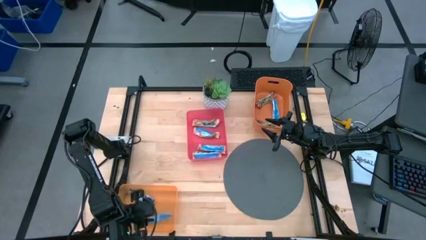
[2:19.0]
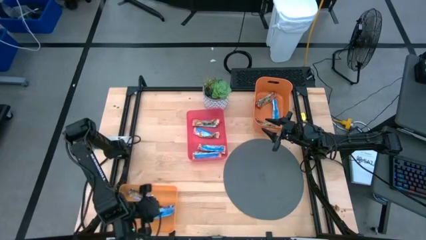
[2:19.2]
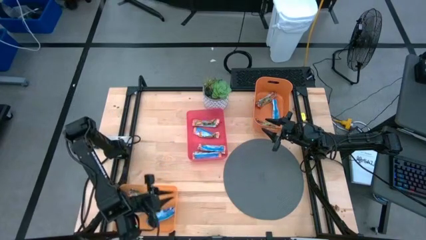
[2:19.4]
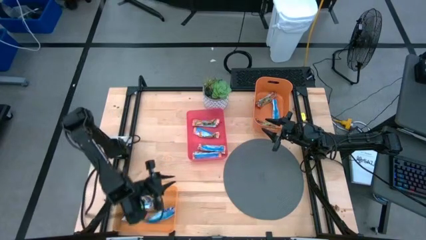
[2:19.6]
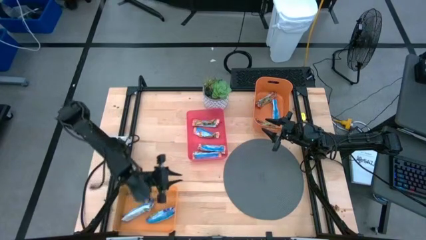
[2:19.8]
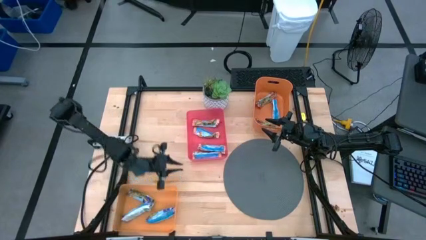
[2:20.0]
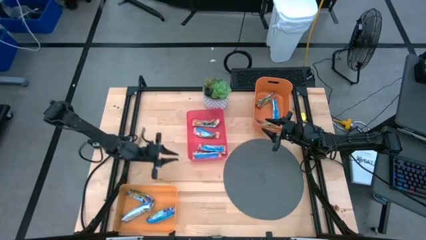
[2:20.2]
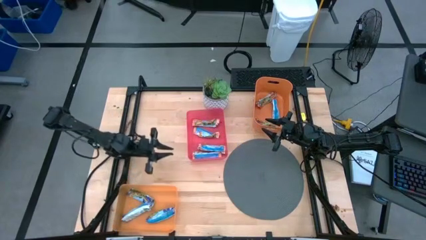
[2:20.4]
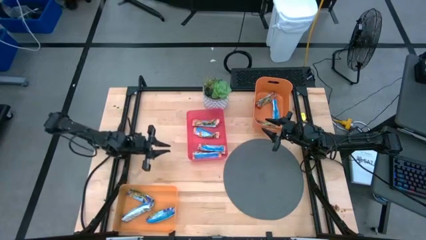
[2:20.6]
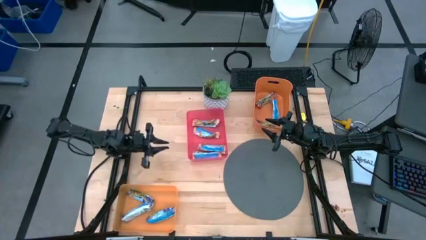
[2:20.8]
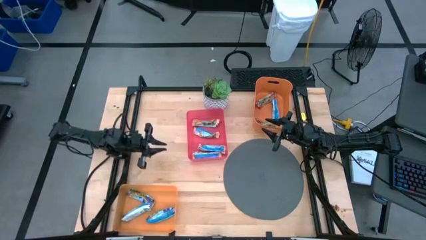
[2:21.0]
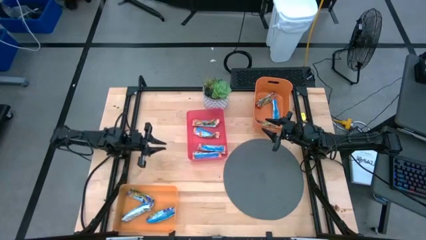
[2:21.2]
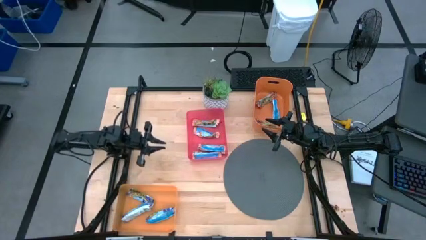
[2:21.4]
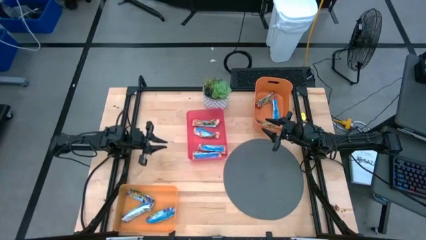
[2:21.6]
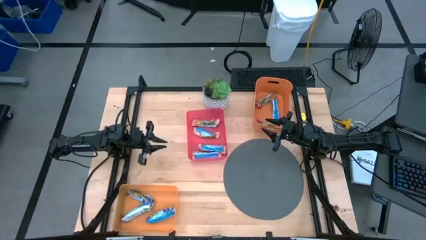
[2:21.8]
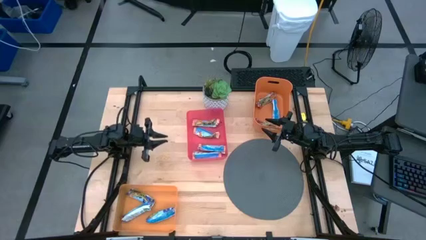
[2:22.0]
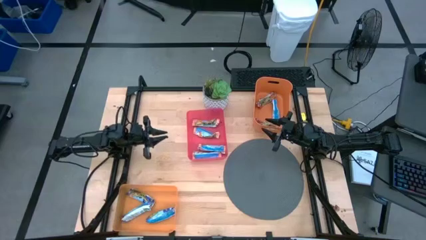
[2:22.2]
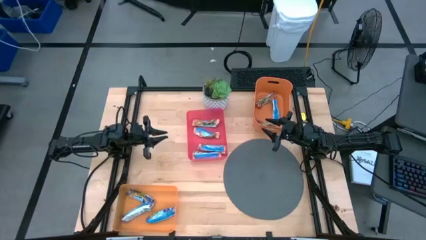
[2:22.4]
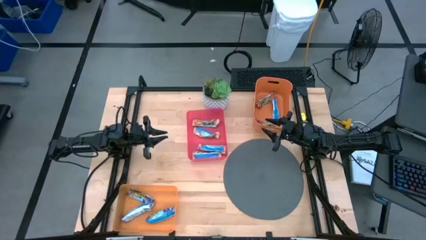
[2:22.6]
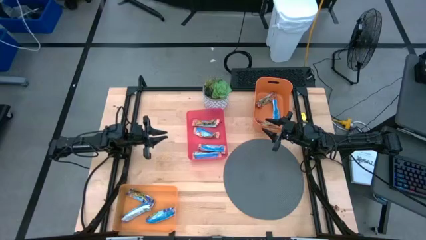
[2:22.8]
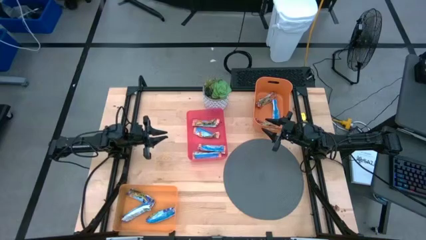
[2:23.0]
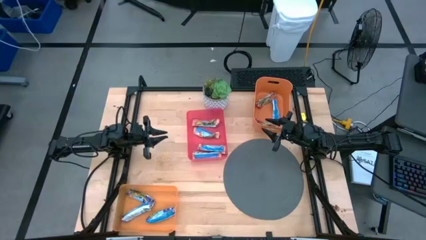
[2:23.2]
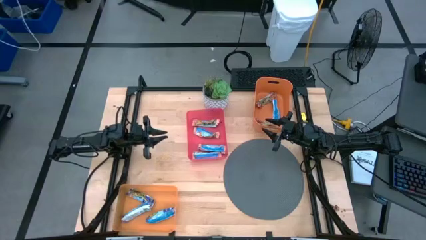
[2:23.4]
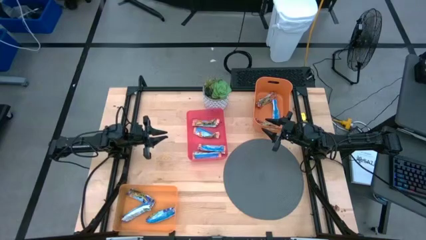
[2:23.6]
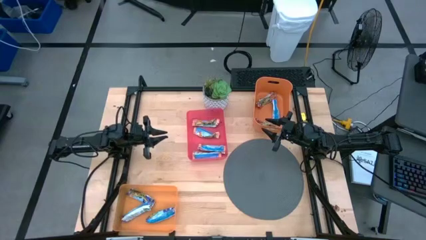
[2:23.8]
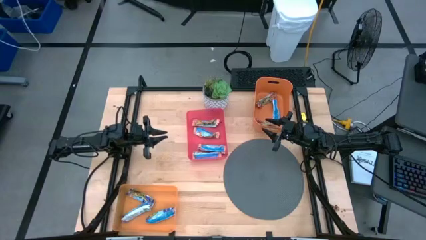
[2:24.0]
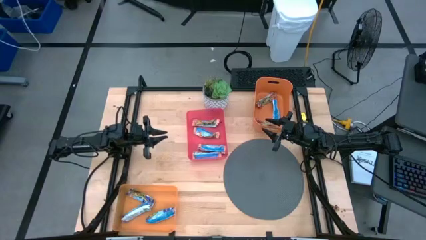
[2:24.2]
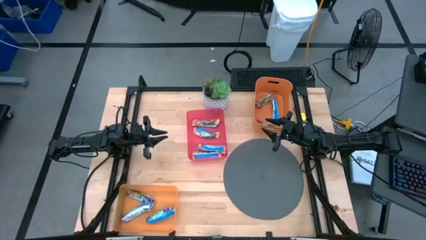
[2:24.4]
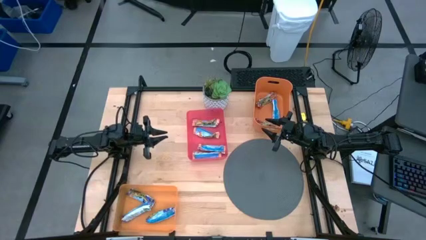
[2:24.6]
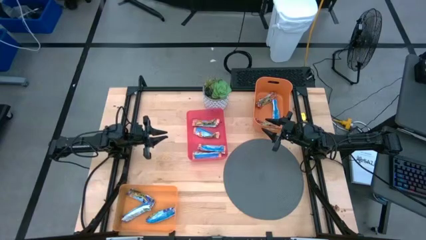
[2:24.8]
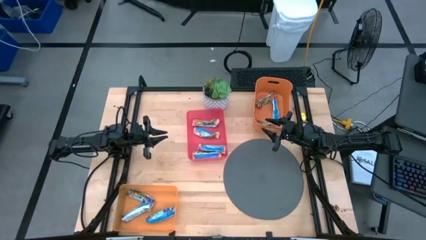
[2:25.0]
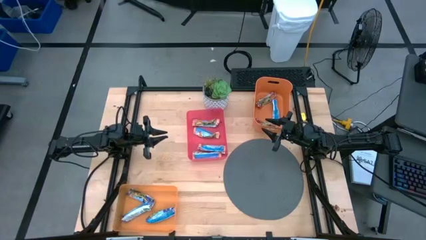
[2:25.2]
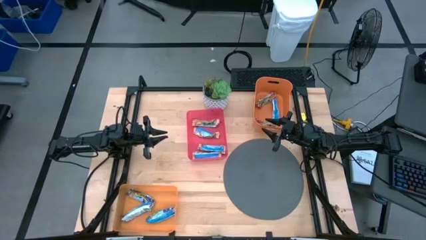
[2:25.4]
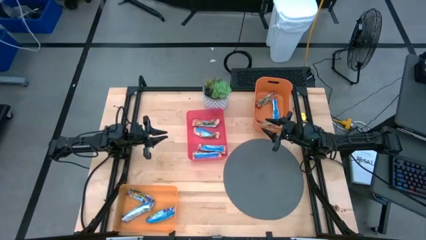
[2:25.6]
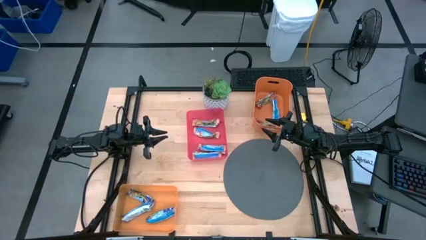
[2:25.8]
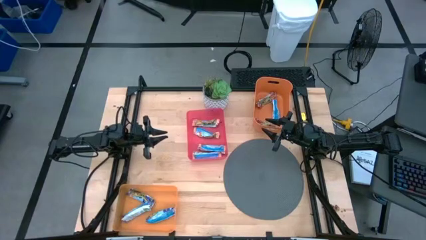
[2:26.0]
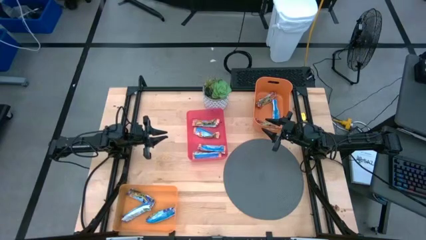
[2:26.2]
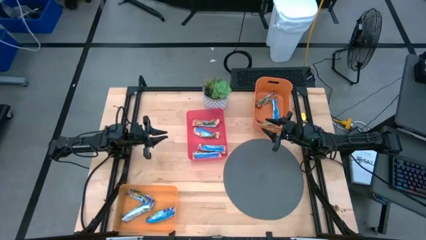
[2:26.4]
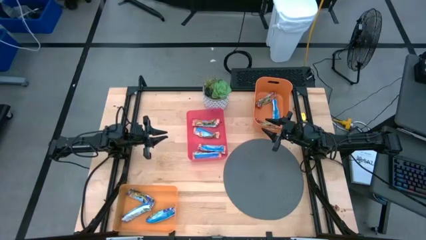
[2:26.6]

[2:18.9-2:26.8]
Task: Pick and place Granola Bars by type
Return to Home Position

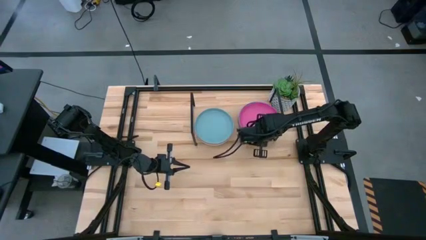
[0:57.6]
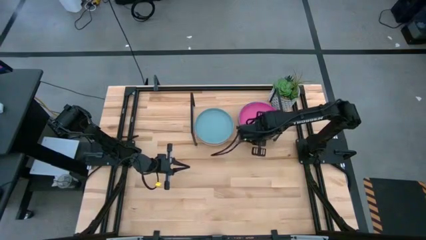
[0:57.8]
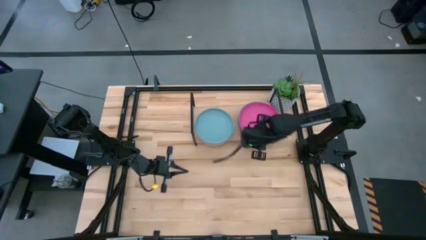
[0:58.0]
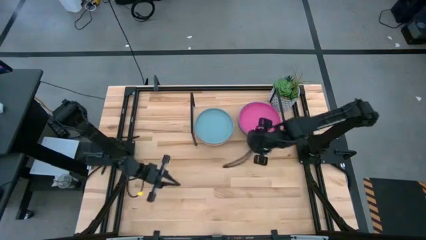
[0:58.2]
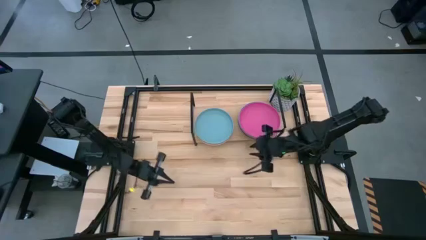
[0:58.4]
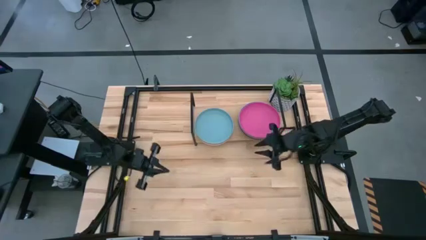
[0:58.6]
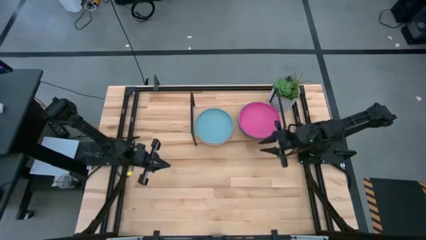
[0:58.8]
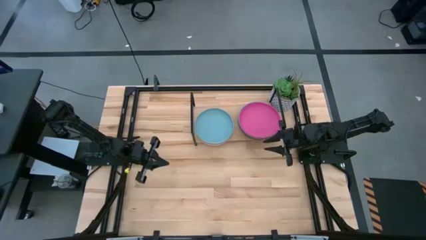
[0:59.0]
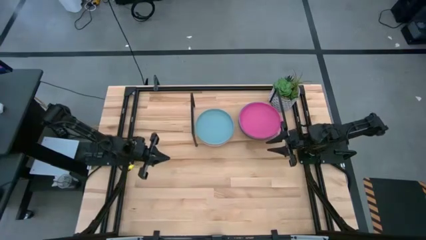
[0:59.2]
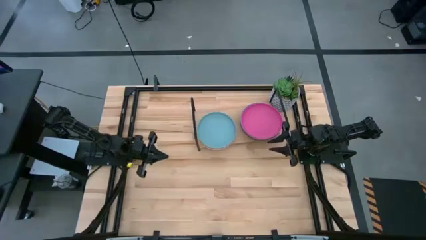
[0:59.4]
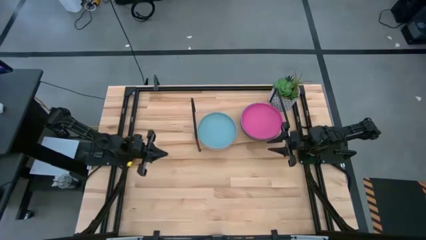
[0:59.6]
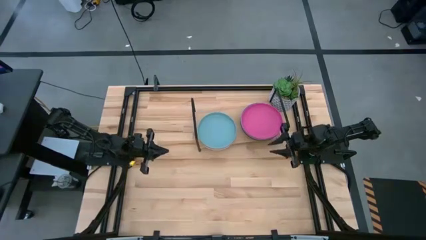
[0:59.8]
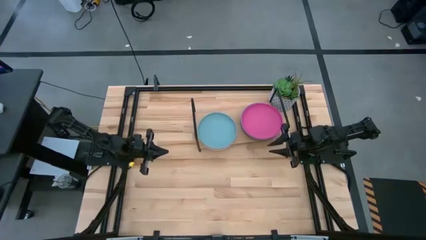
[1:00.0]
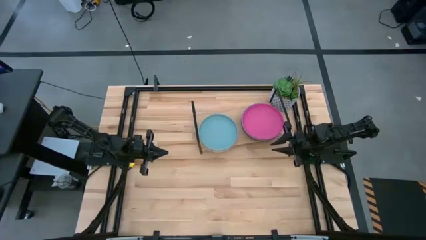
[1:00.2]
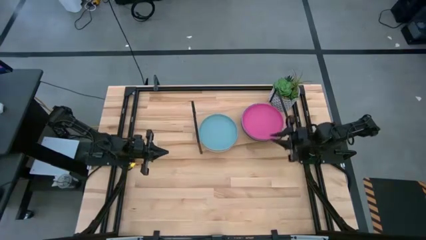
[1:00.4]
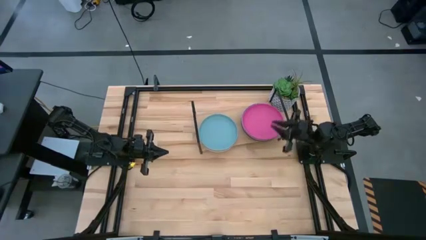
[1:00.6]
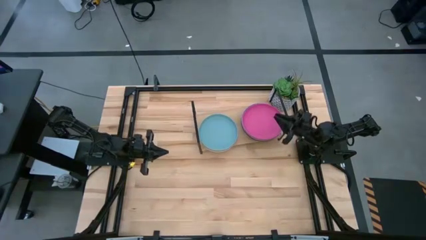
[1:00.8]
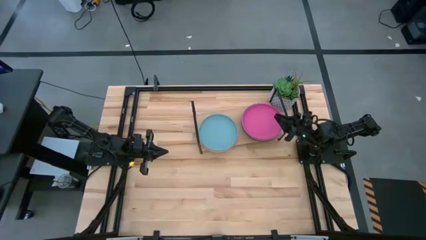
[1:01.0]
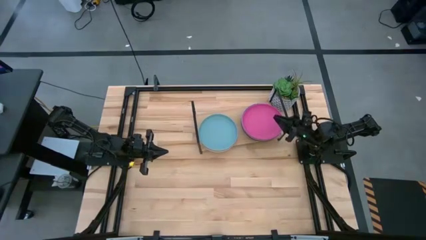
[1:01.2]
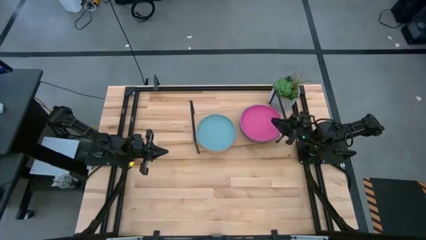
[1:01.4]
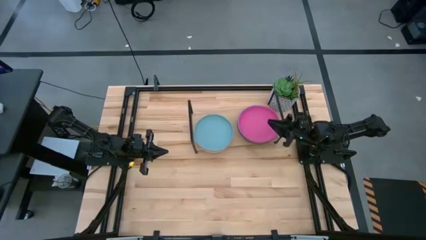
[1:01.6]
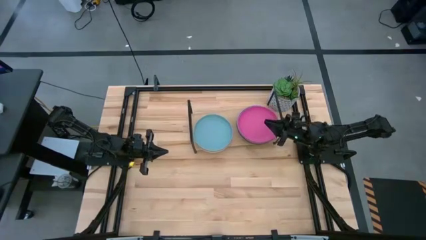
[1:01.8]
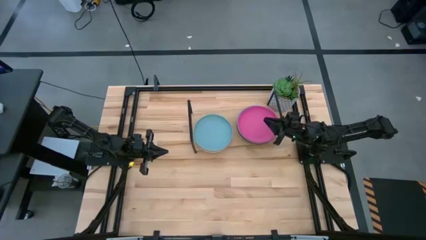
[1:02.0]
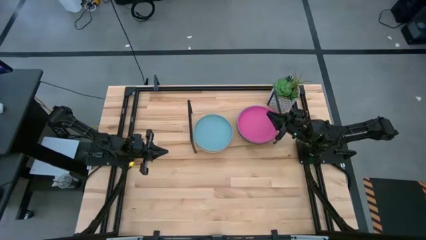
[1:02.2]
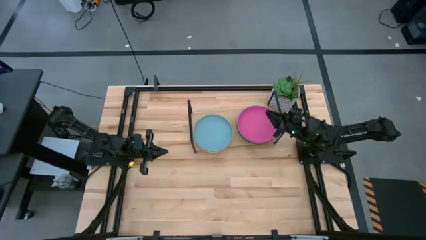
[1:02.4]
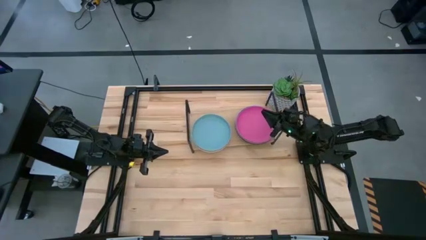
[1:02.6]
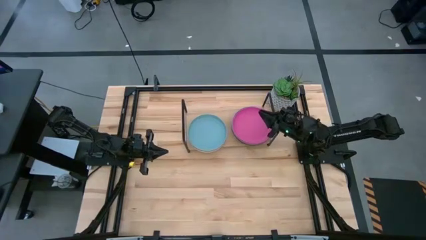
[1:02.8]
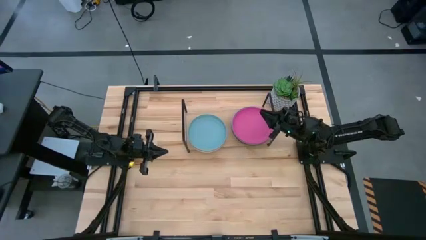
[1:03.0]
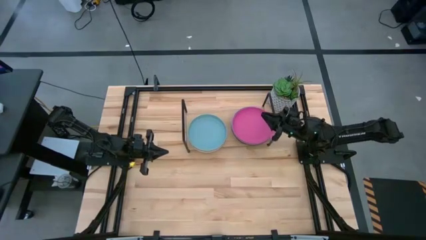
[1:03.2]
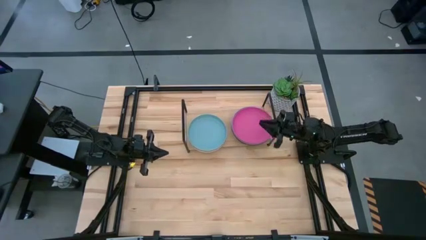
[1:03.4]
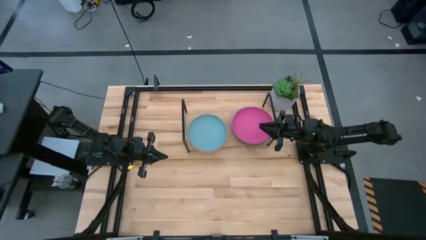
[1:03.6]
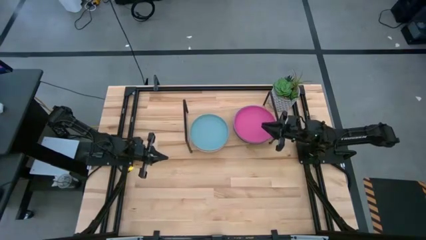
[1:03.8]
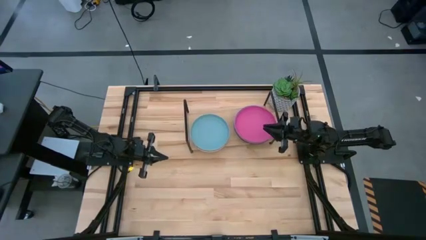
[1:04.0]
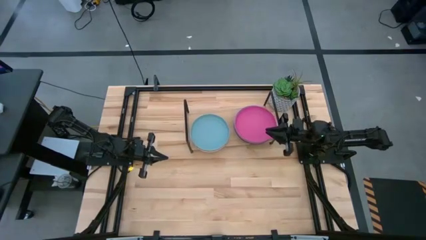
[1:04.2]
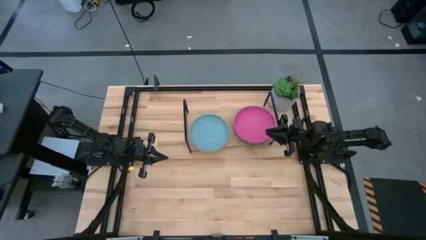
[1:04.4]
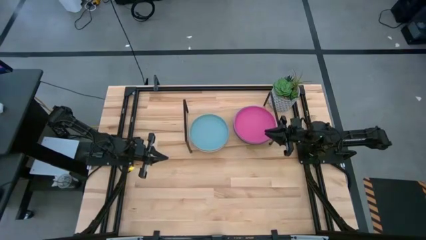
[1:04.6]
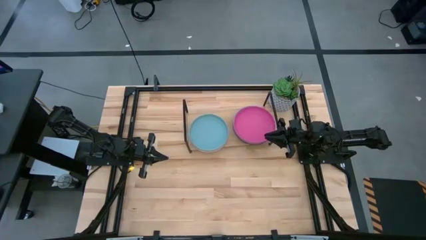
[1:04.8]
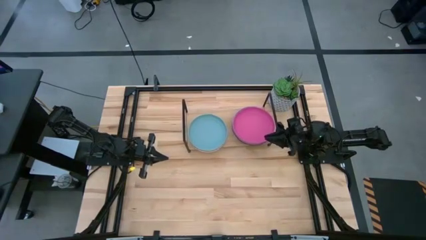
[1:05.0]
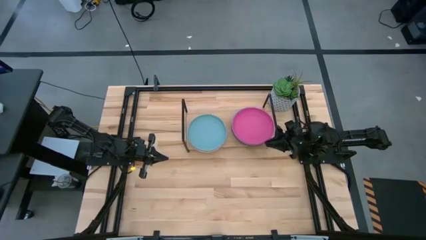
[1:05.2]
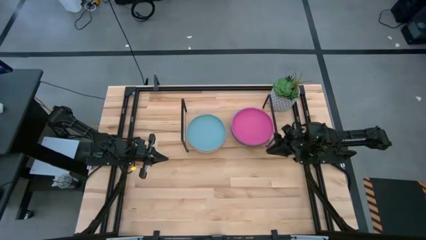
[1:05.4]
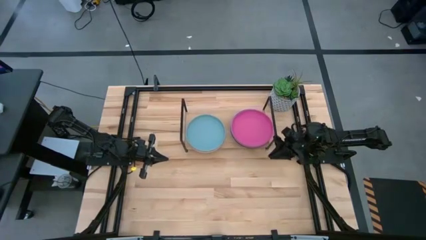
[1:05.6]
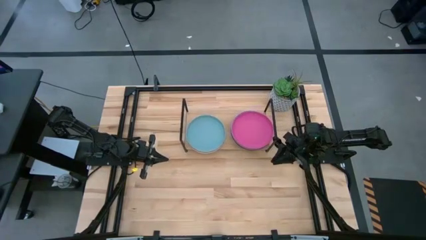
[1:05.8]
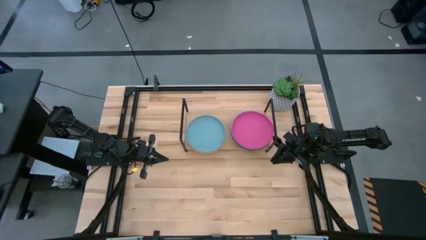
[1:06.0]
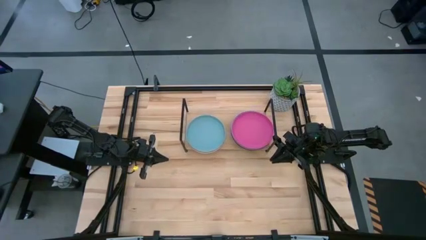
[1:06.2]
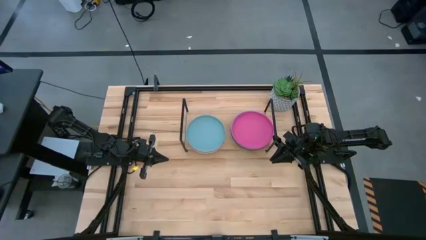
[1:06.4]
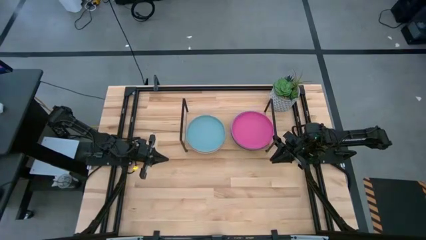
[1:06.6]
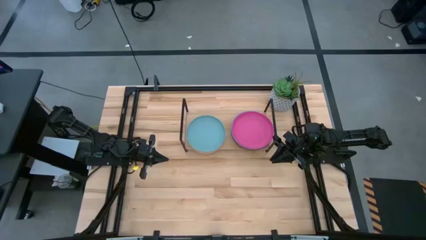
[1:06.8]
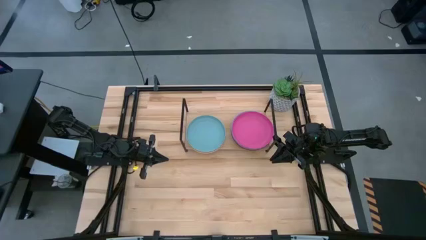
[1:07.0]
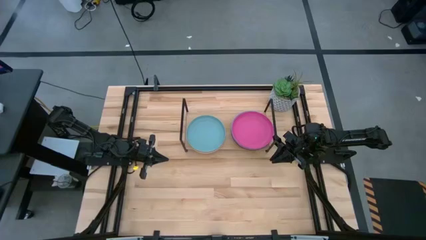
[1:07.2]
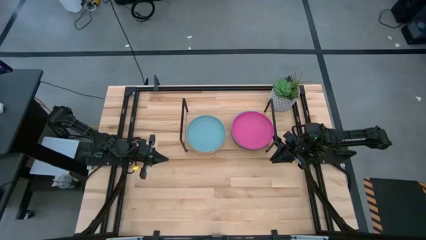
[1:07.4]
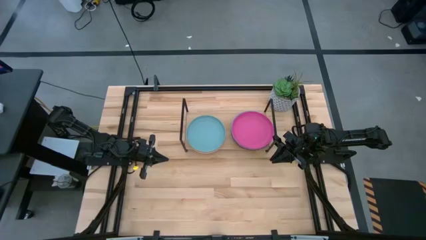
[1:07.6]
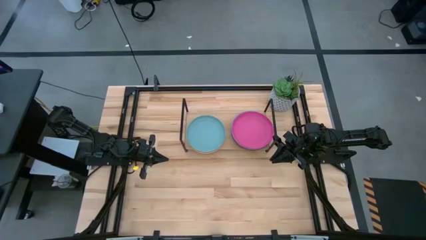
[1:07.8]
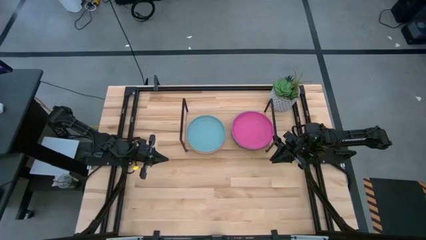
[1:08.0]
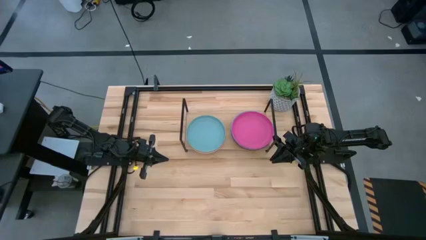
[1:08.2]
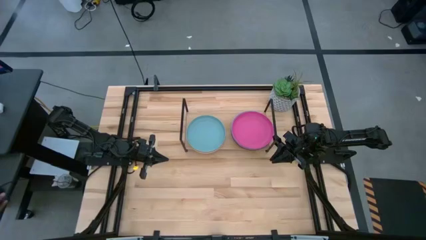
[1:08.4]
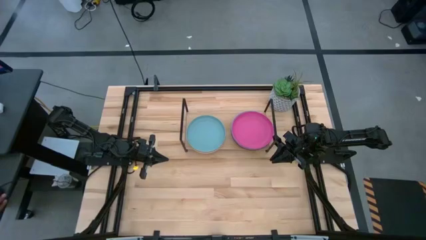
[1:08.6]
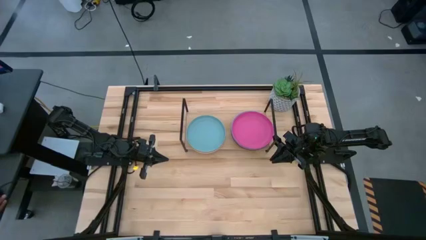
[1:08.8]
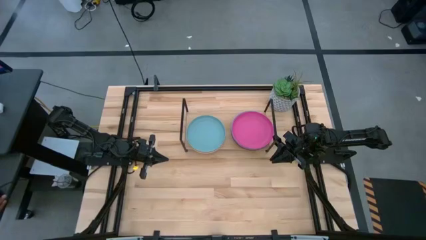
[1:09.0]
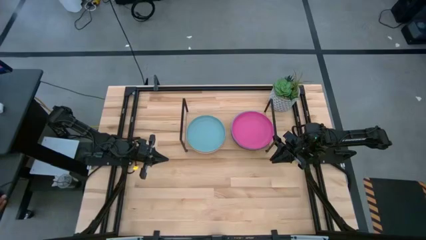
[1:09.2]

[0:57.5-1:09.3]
Task: Place and stack plates onto a shelf
Return to Home Position
